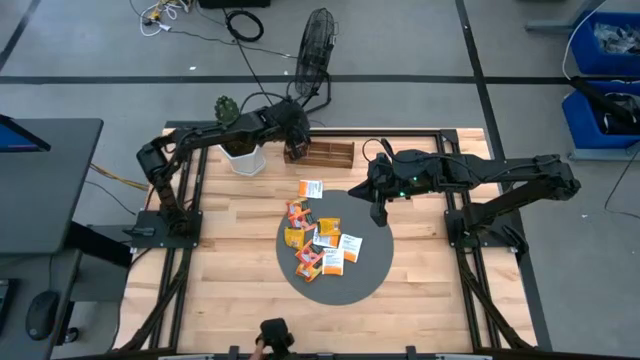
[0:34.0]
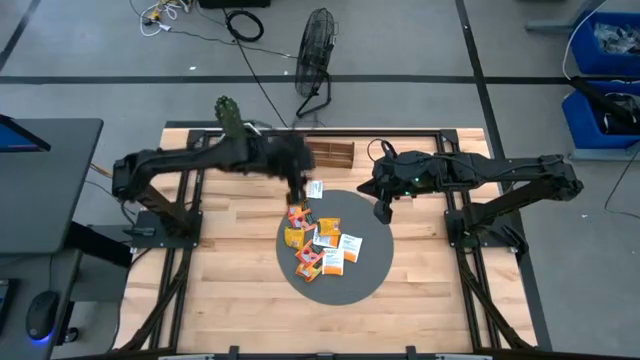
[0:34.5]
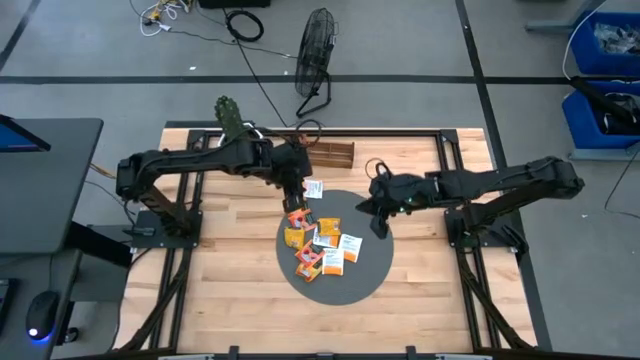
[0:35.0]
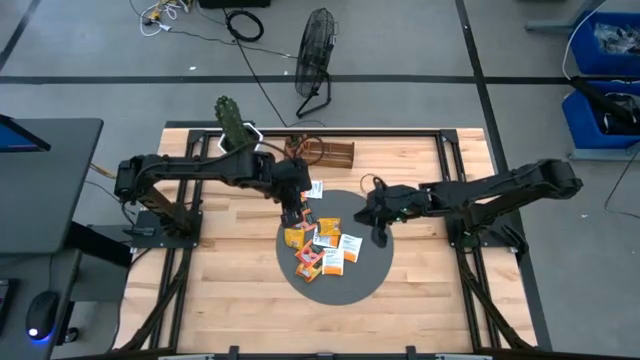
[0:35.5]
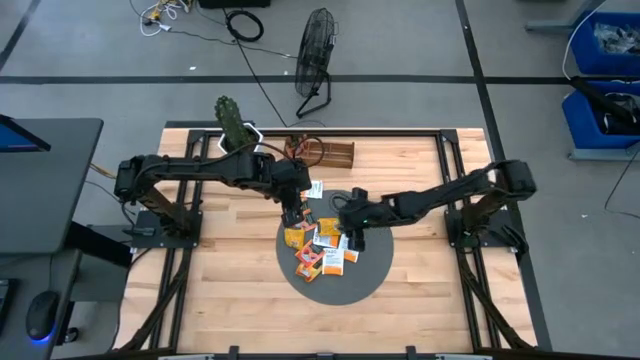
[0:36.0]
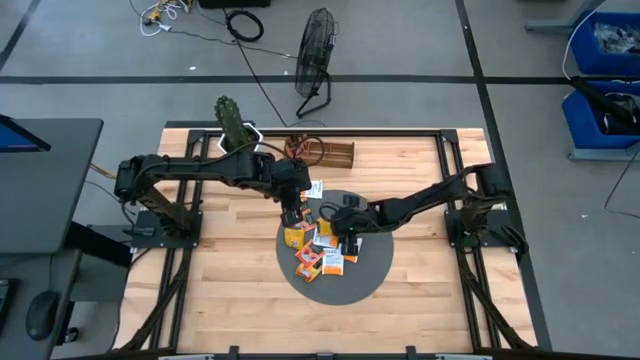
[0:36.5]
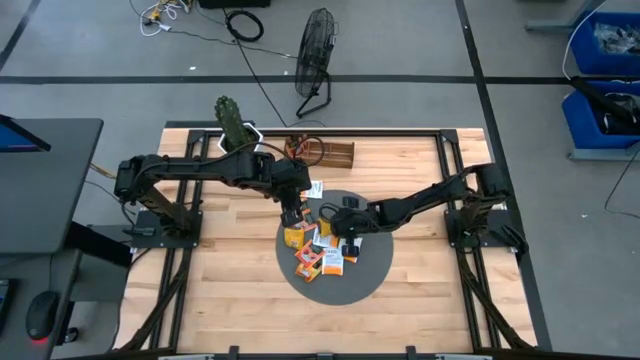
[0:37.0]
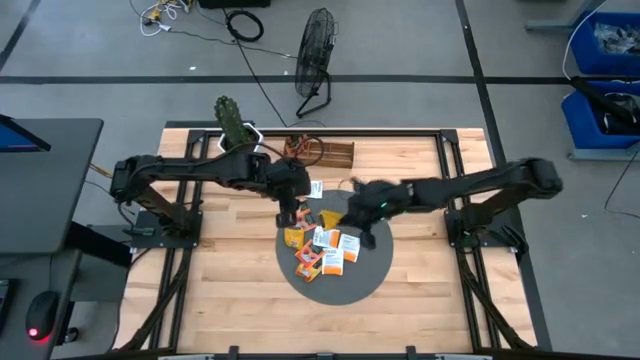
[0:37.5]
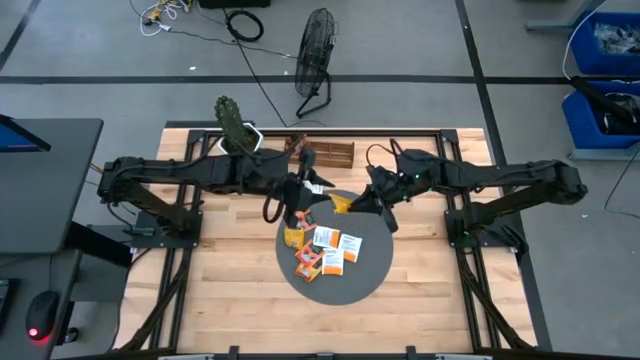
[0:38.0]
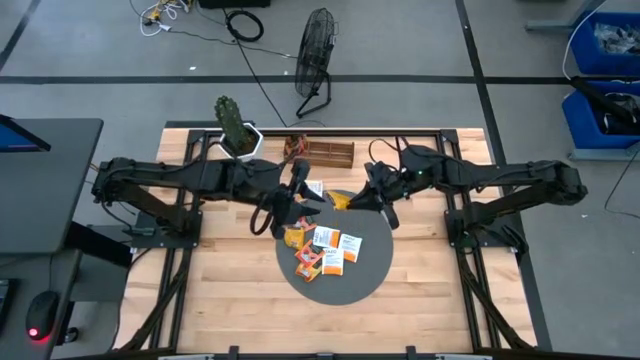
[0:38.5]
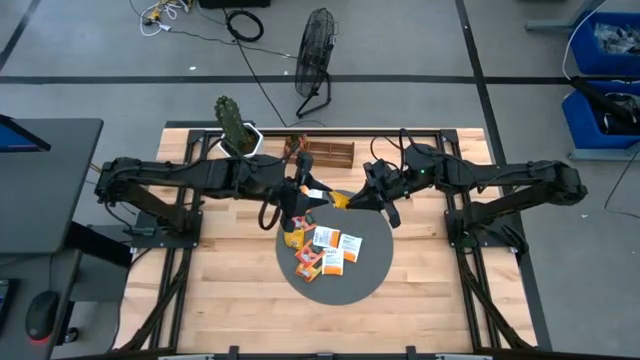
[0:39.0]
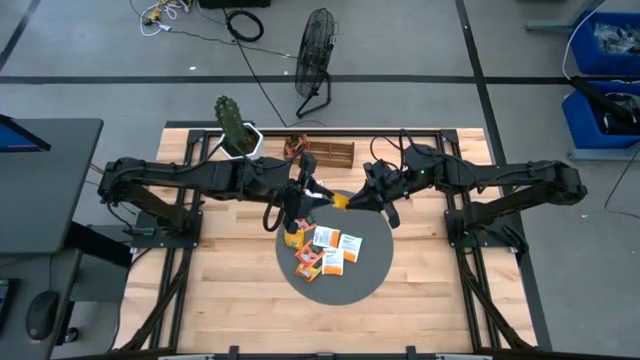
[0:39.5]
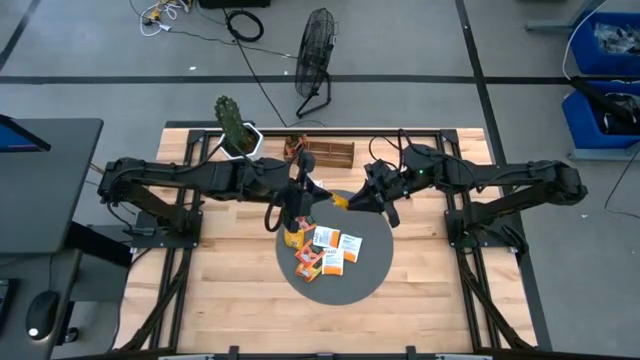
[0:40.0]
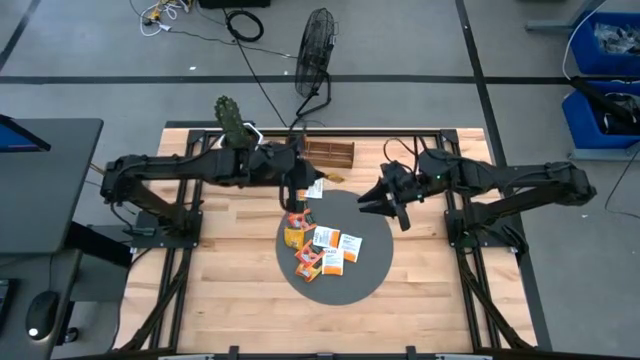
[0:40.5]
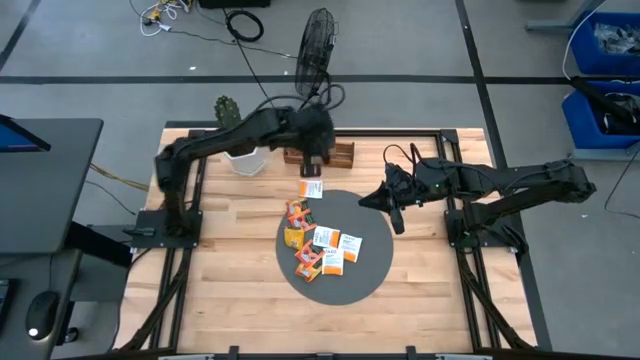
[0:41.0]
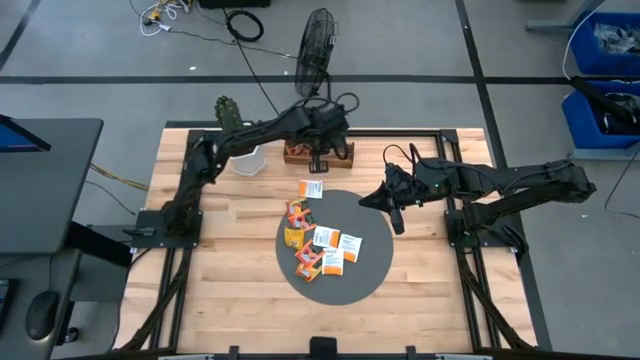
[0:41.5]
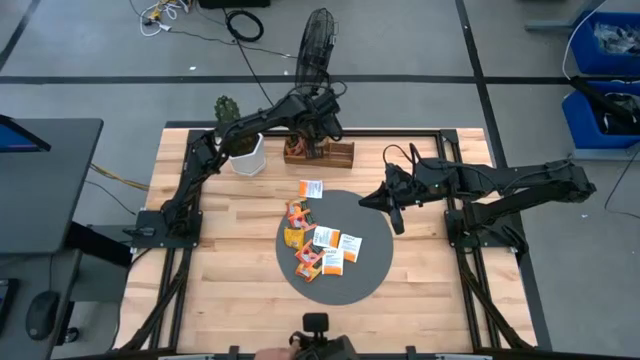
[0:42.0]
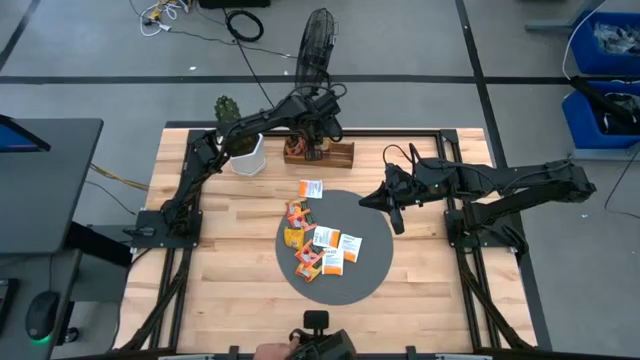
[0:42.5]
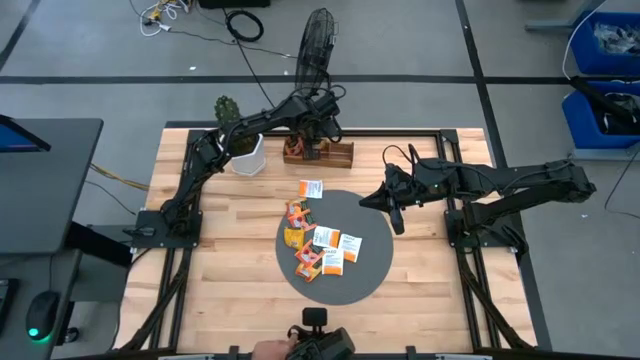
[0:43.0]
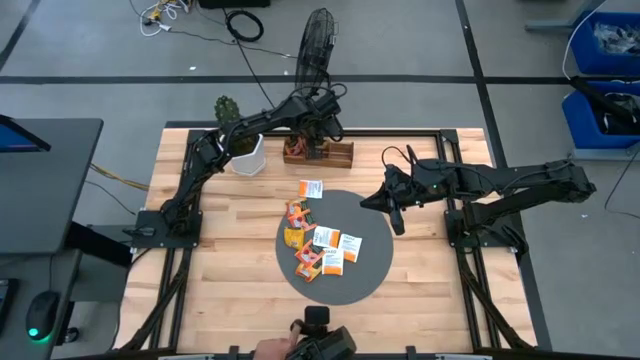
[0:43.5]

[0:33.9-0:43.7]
Task: Pick & Place Tea
Put the yellow tea bag into the middle section of the wooden organizer

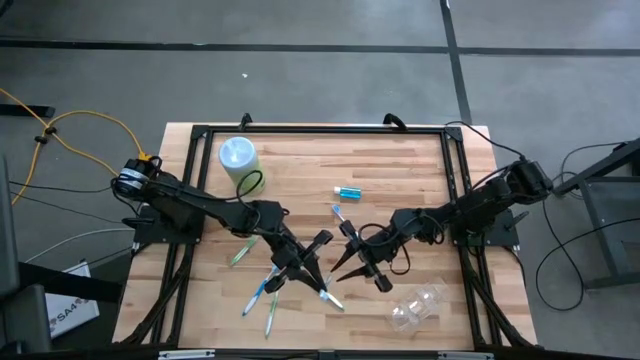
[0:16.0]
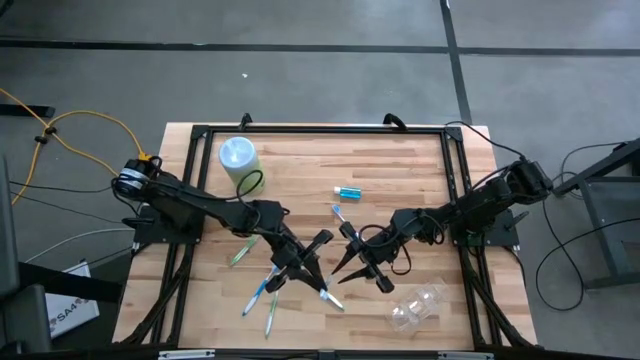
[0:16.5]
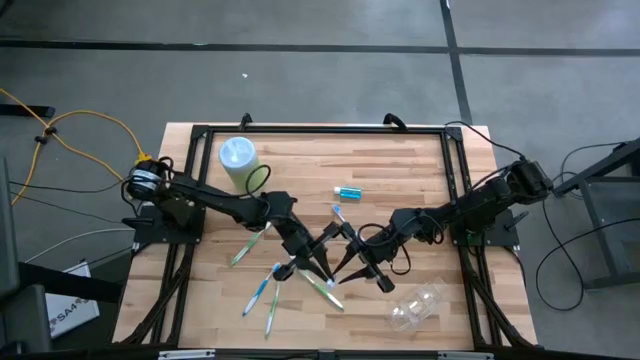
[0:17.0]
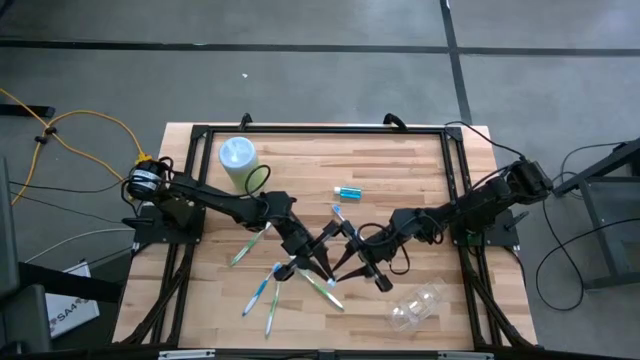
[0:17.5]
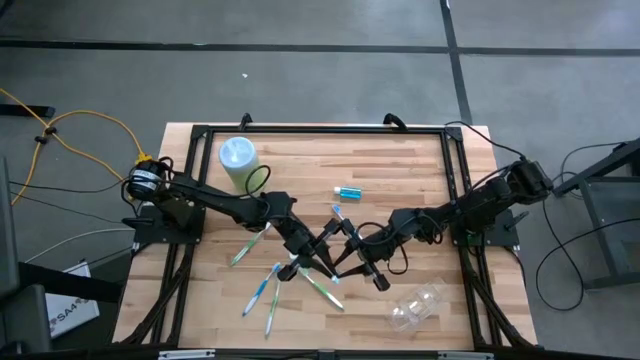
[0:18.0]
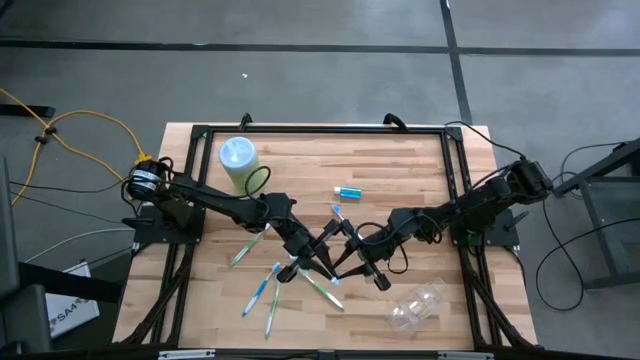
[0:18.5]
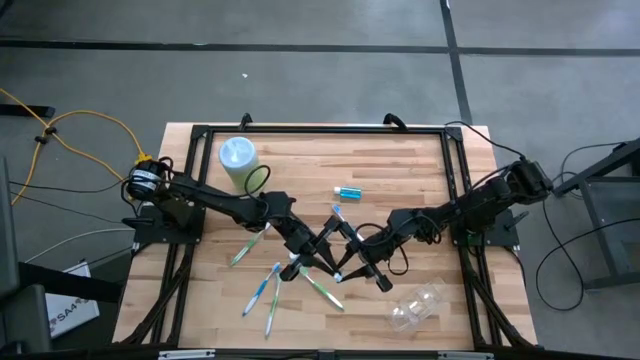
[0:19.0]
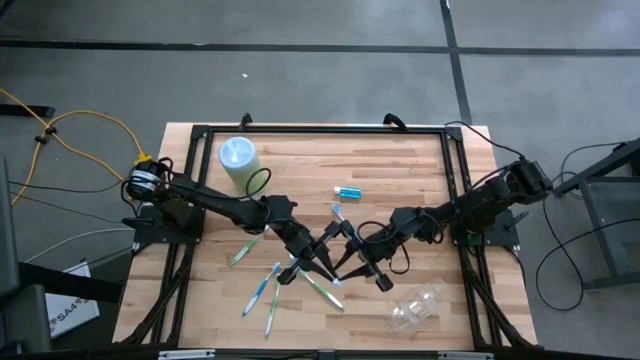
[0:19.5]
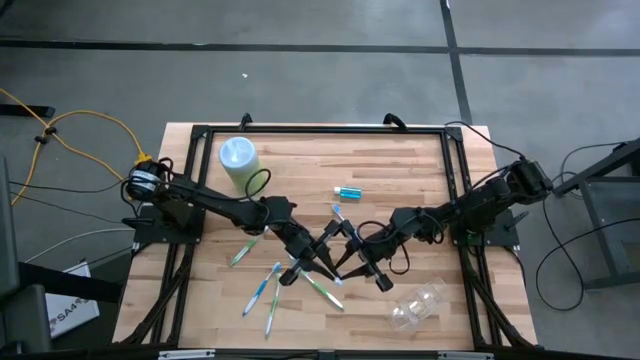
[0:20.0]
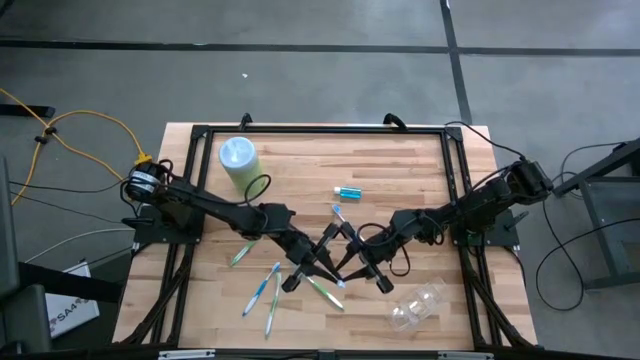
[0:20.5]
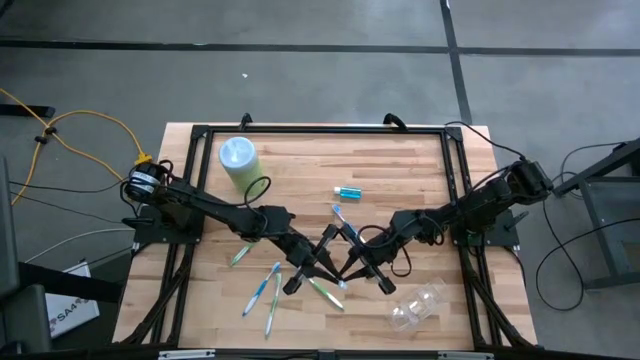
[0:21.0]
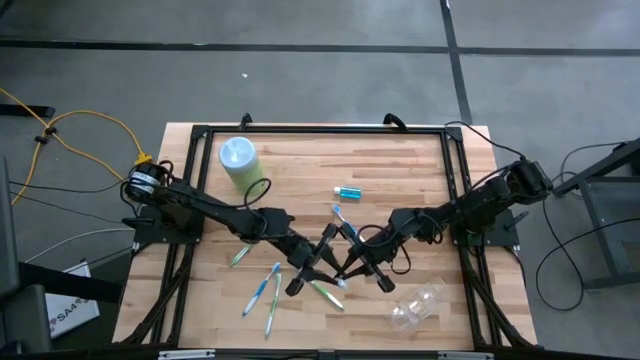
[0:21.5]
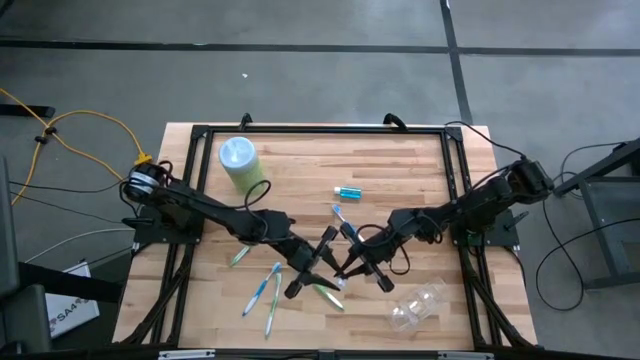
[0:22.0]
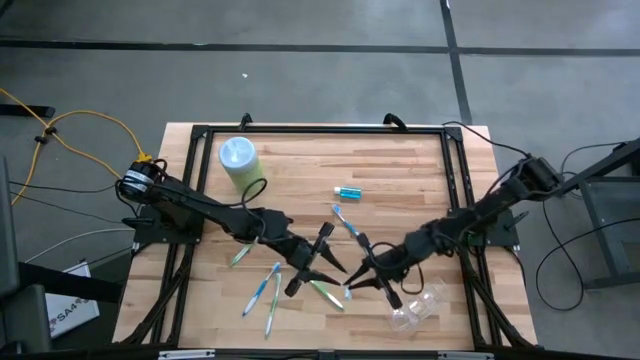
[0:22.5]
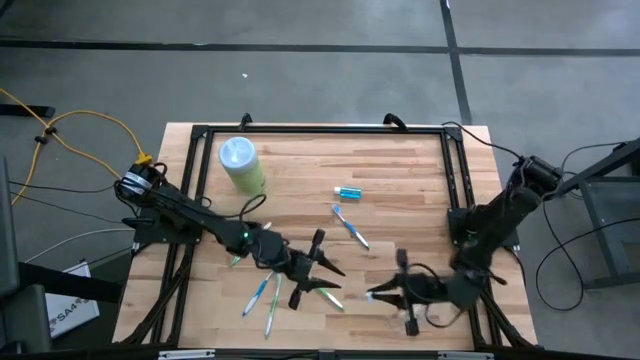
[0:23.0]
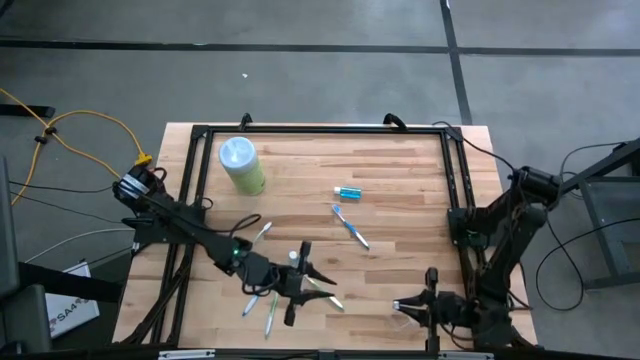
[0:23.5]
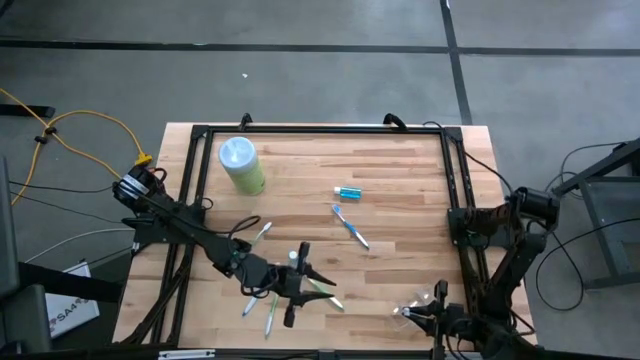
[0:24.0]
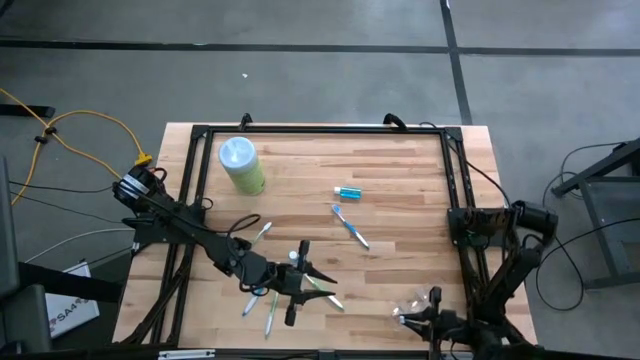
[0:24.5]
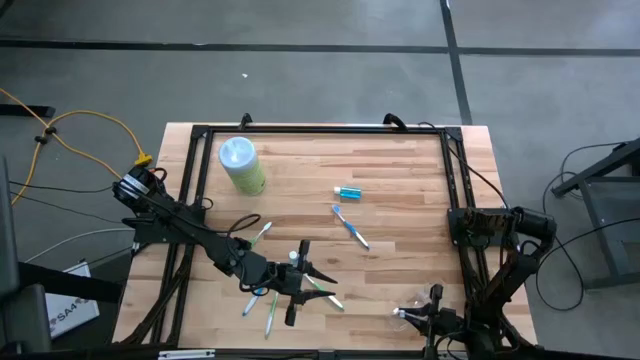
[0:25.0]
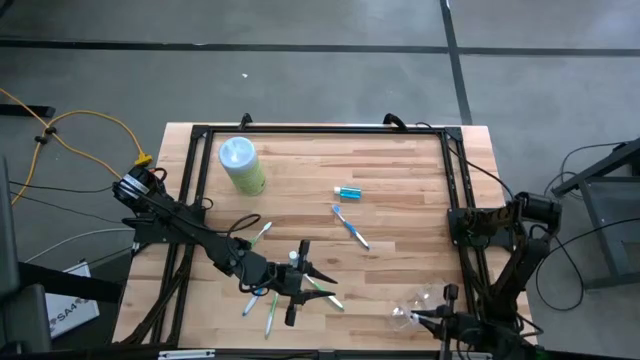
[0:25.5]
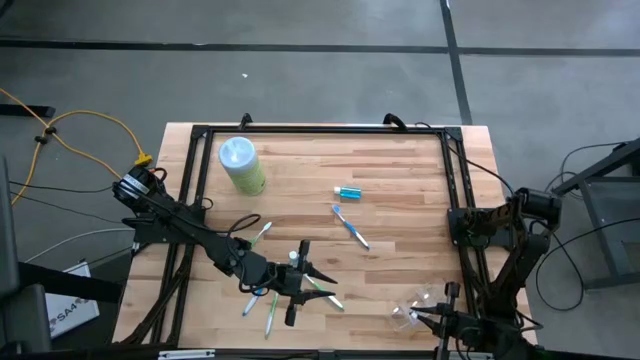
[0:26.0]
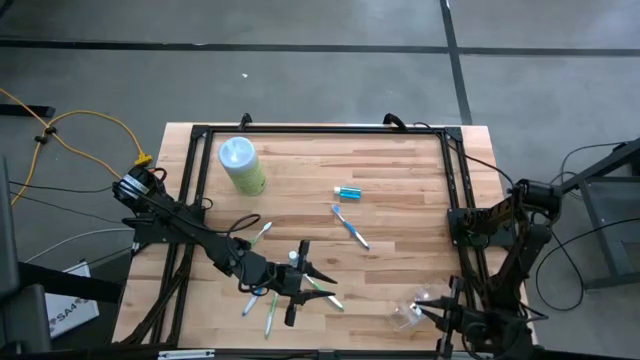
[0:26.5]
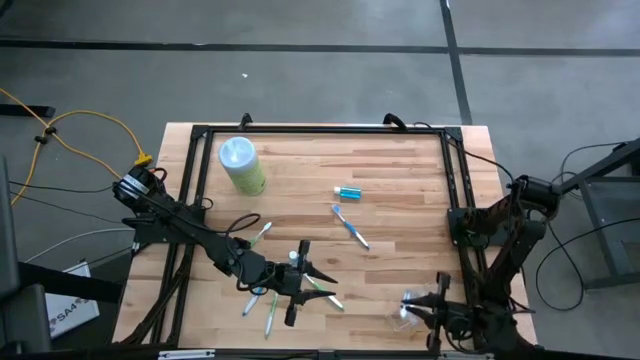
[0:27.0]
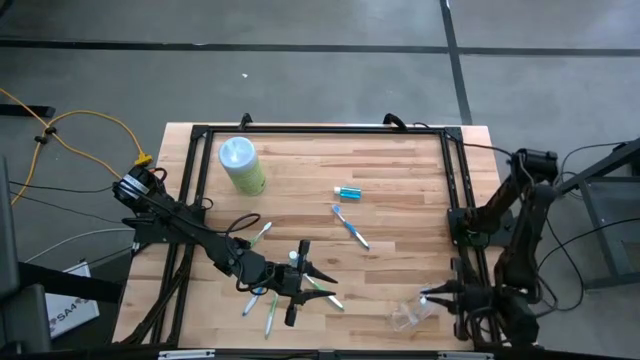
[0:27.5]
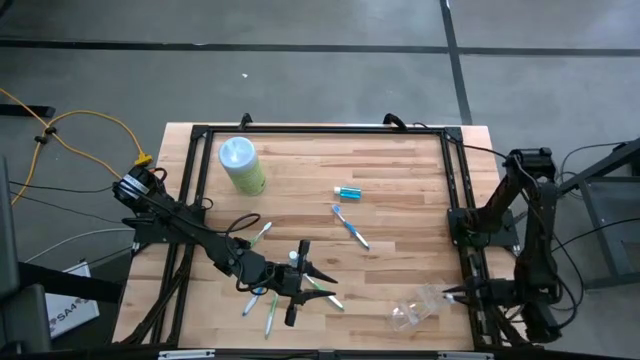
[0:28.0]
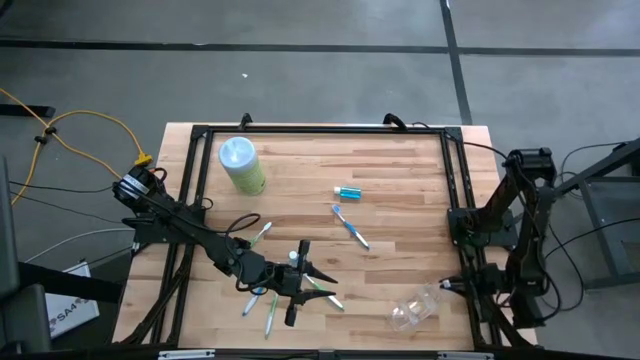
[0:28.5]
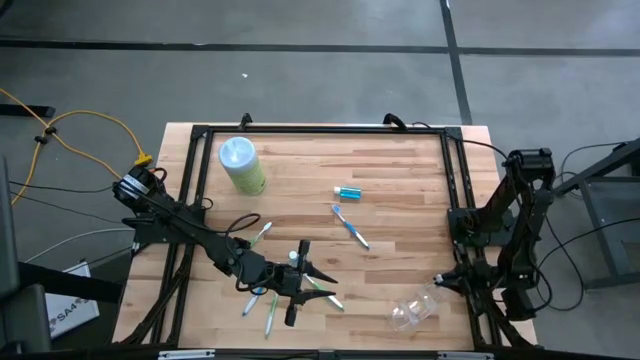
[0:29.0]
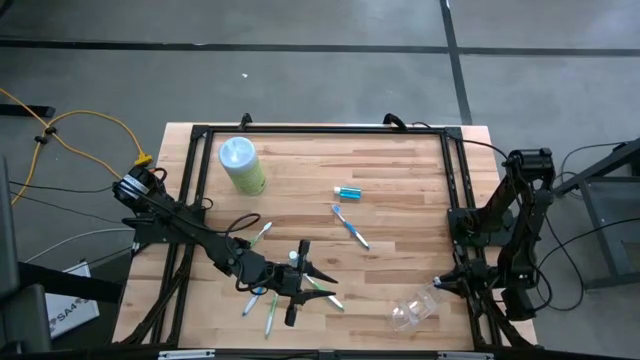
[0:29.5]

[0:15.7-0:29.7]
Task: Pick & Place toothbrushing station
Put the left blue toothbrush into the right section of the transparent organizer
